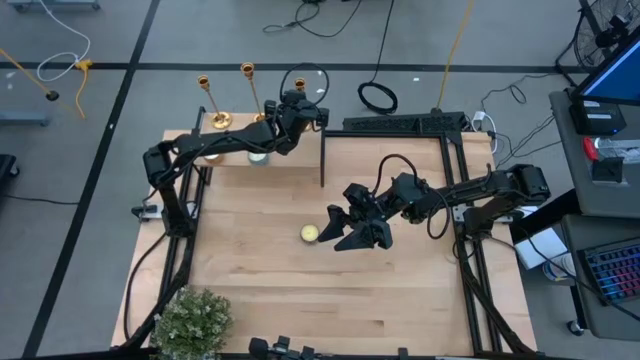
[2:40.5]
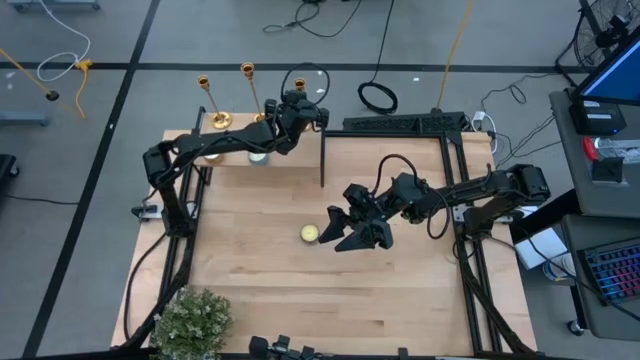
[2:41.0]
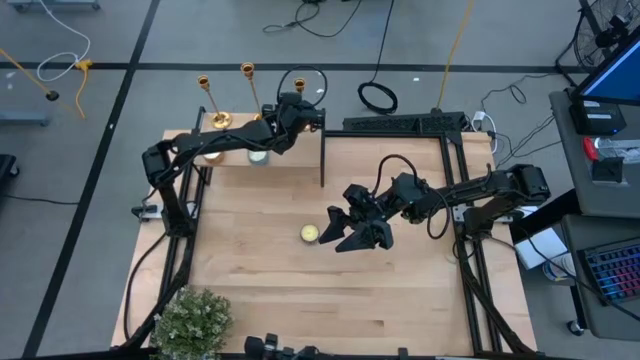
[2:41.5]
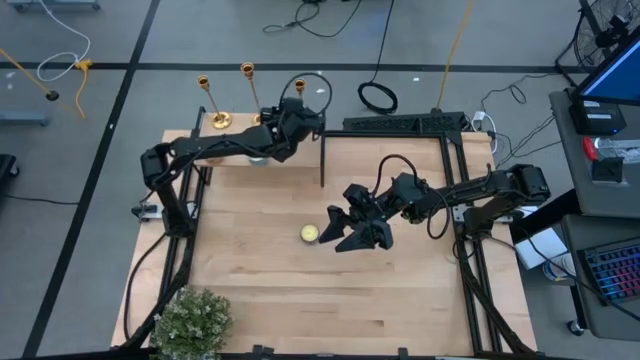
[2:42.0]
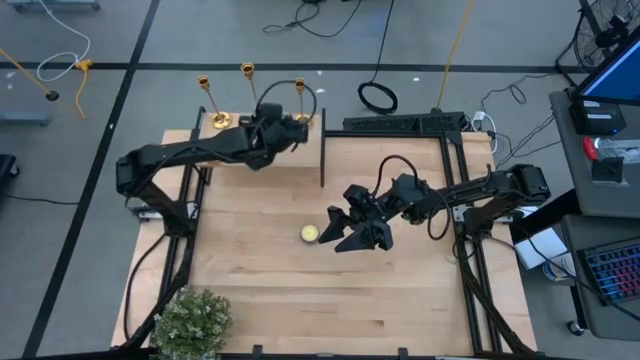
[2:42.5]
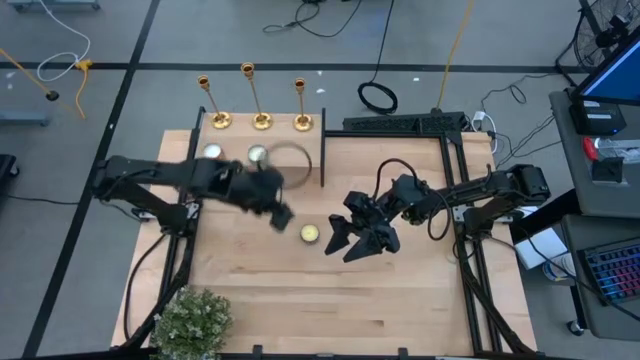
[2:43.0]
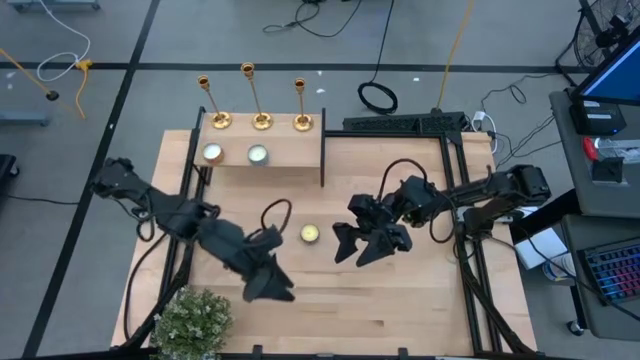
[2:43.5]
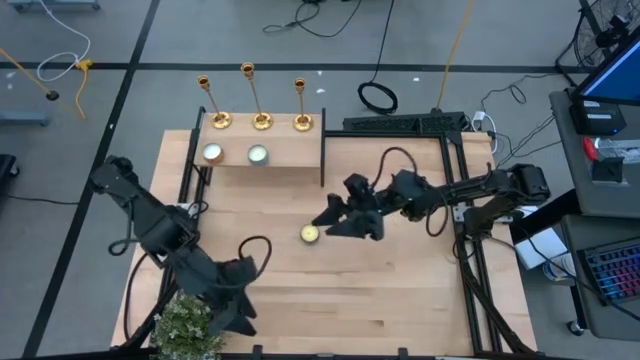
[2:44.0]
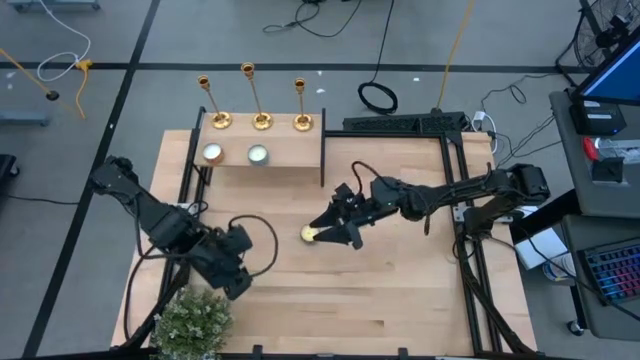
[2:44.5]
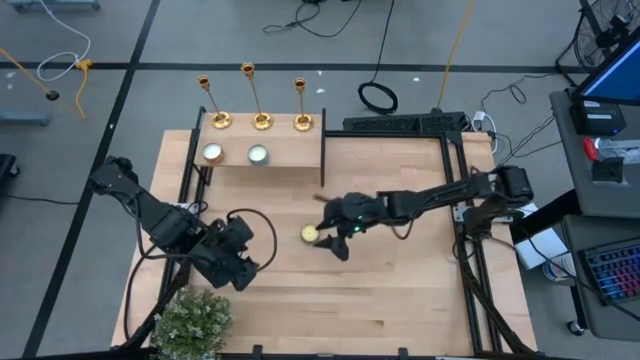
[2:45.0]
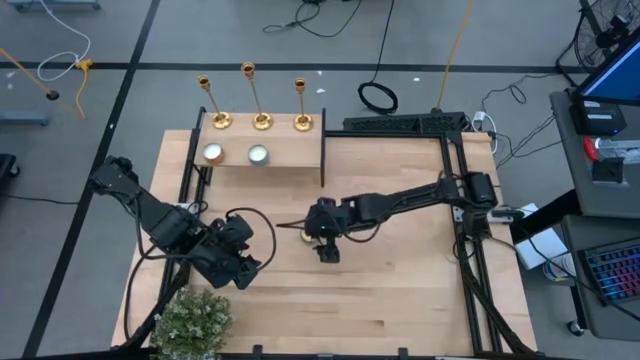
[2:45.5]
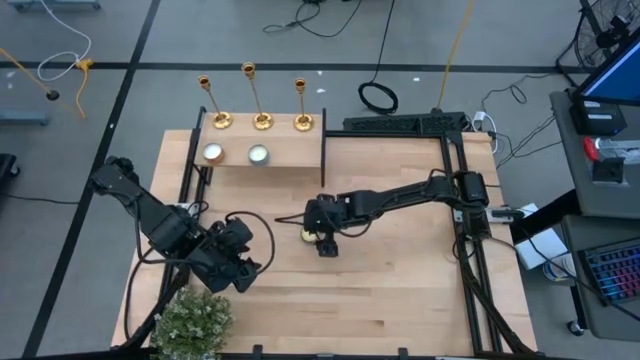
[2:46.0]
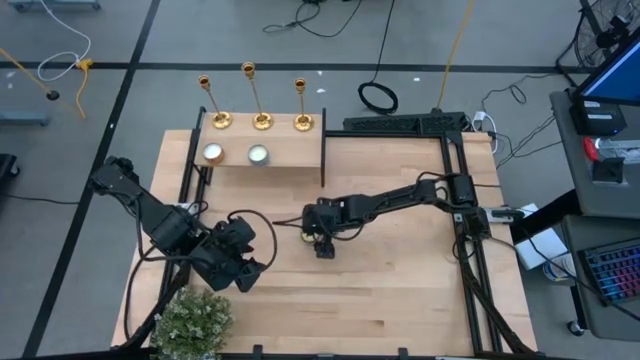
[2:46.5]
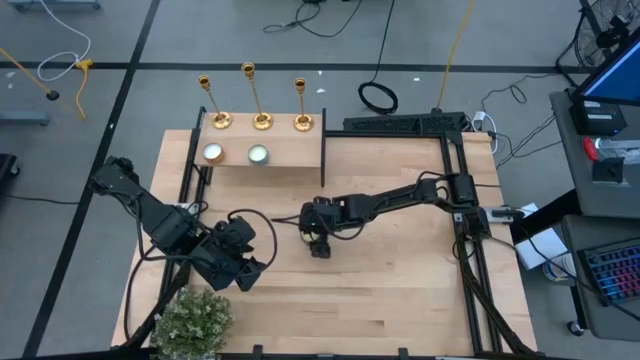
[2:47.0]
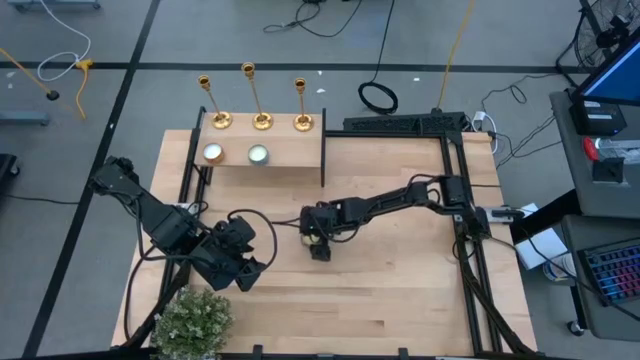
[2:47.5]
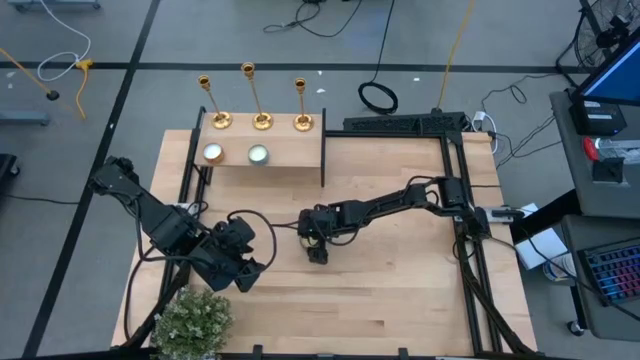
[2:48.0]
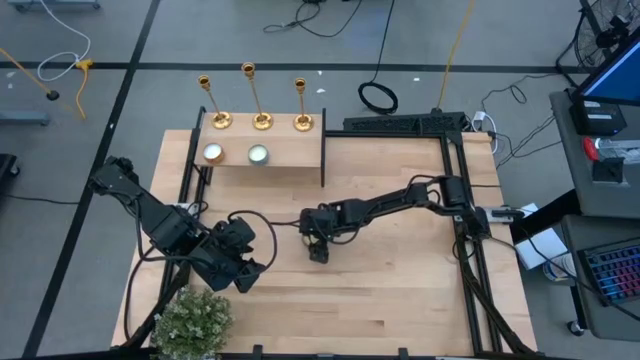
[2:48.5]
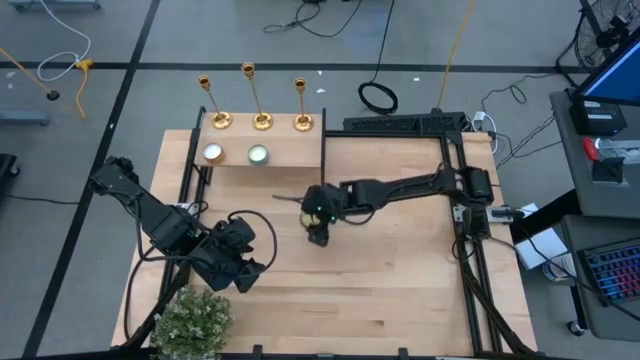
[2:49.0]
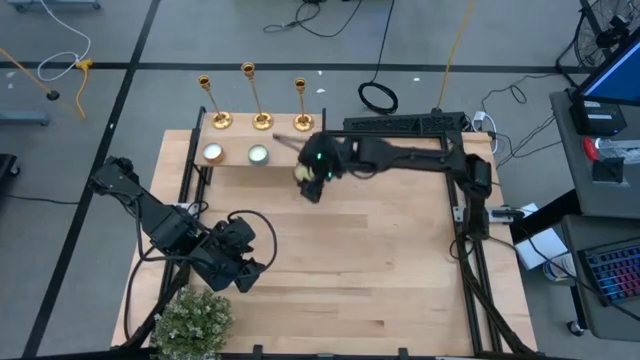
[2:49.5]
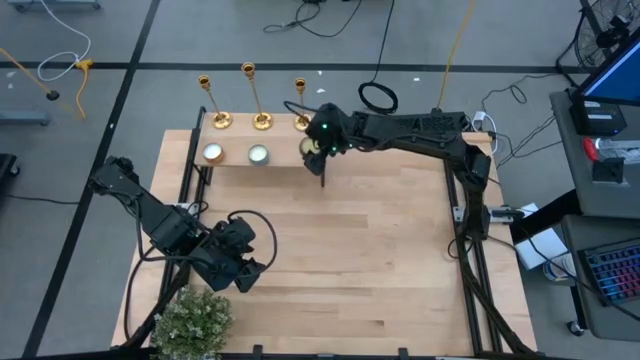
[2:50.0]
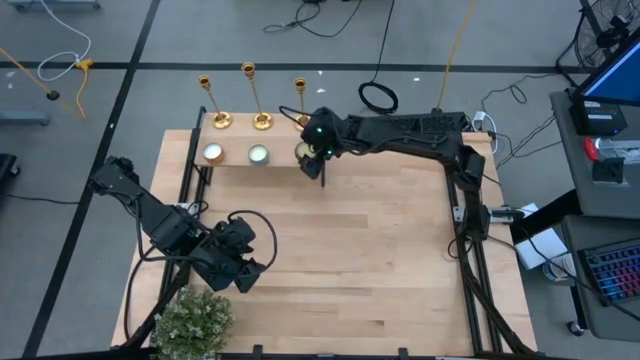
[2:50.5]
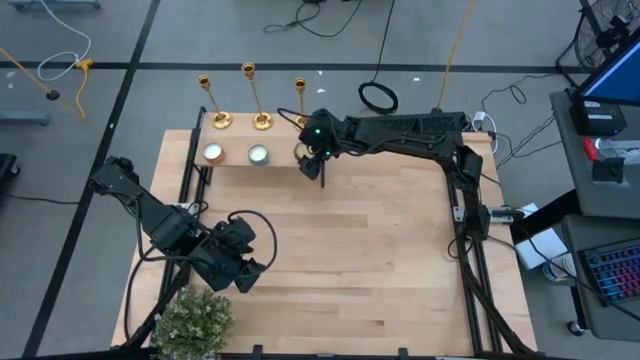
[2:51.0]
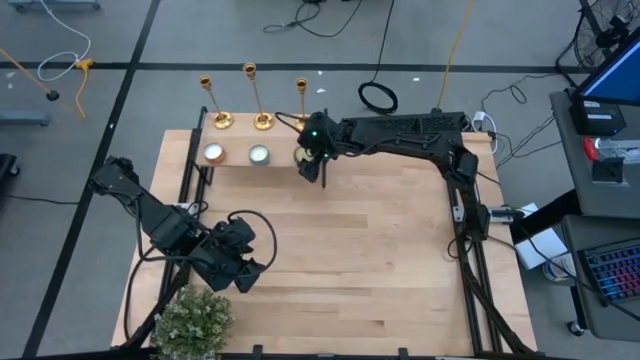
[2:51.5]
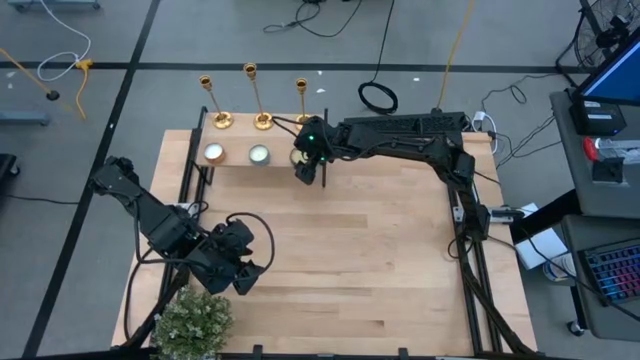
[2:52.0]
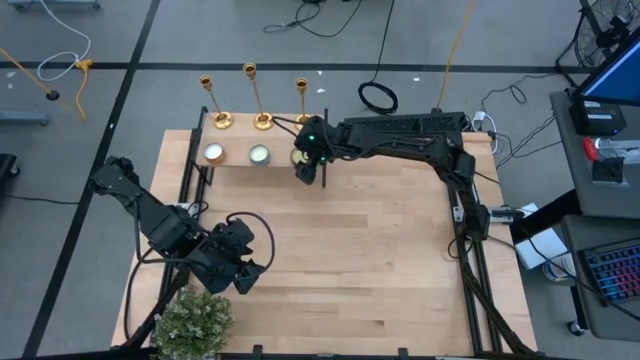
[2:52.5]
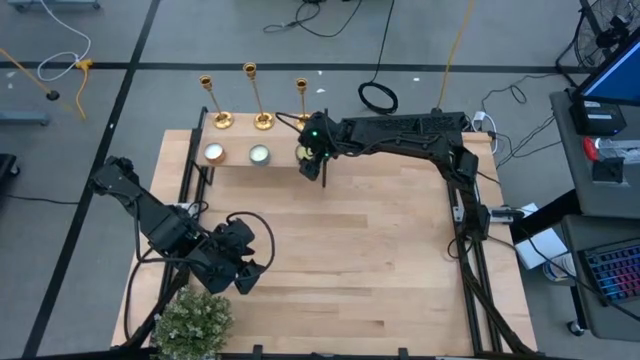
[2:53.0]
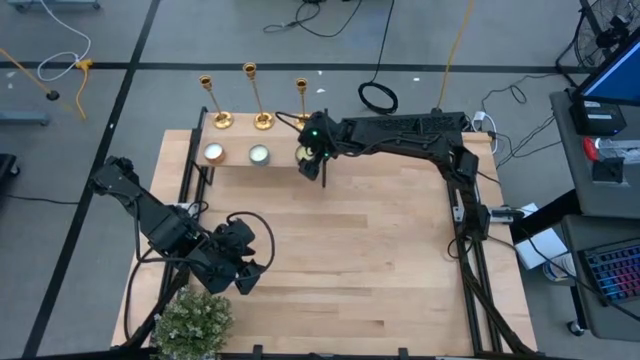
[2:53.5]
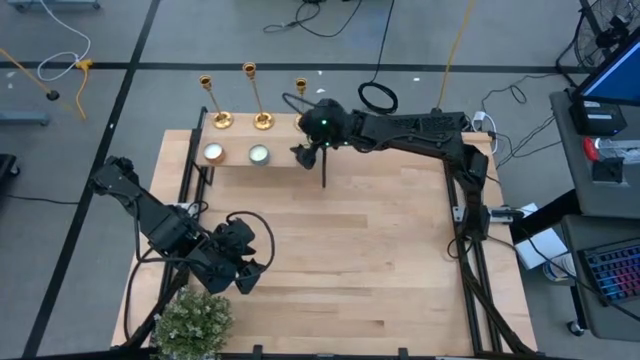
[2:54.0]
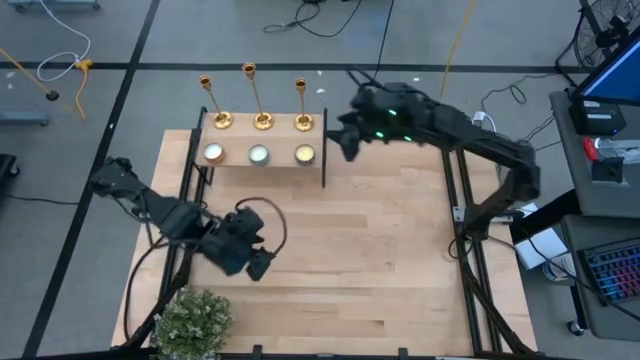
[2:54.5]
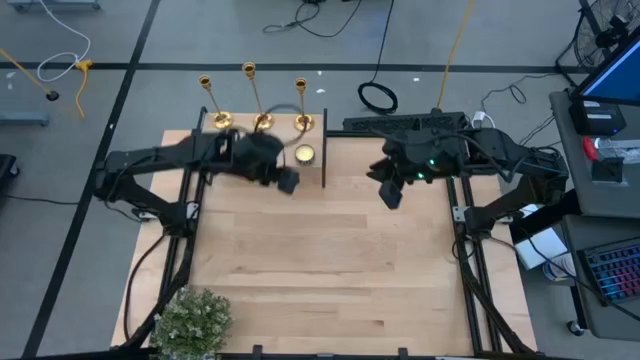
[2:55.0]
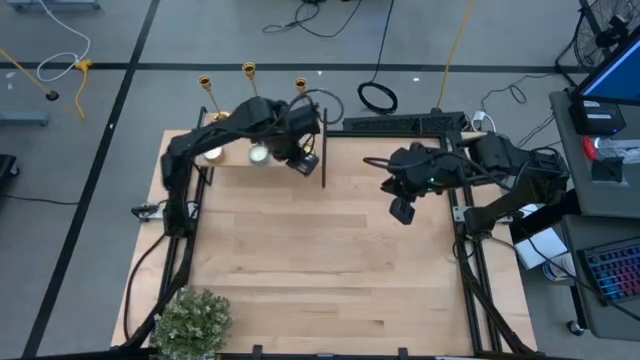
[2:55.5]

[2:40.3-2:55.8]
Task: Pick & Place candle stick holders
Put the white scented candle on the shelf
